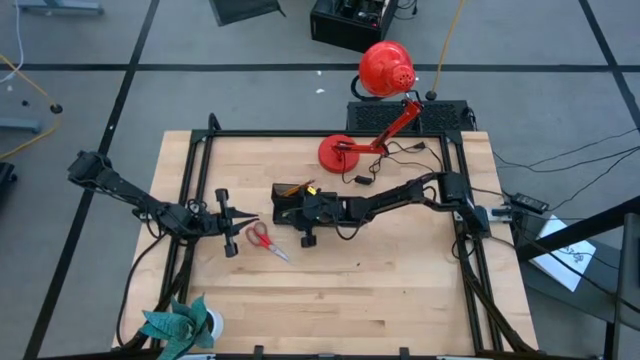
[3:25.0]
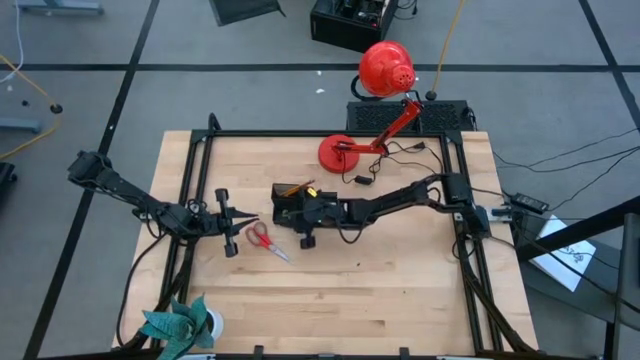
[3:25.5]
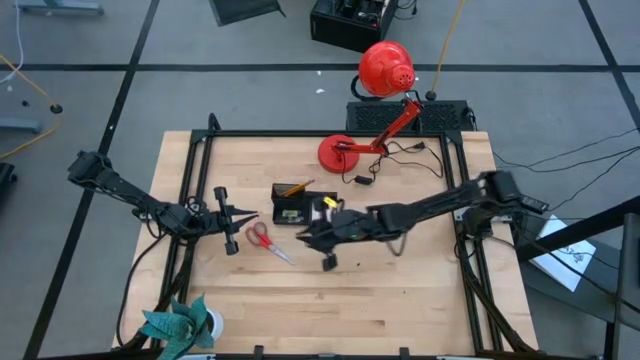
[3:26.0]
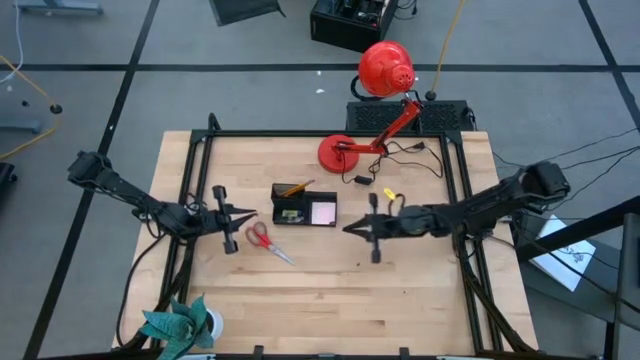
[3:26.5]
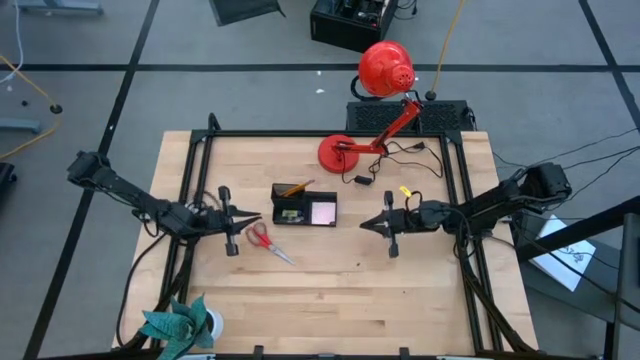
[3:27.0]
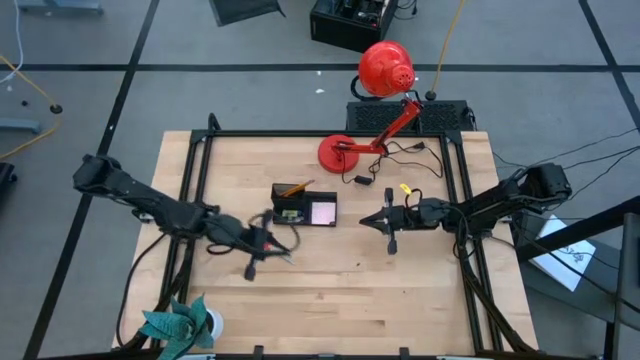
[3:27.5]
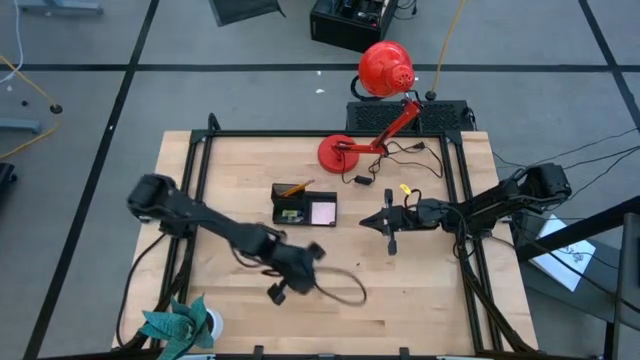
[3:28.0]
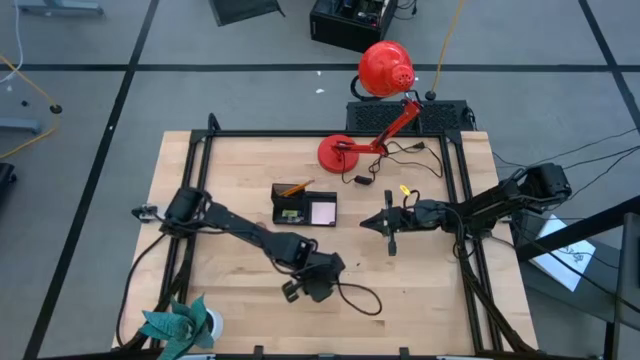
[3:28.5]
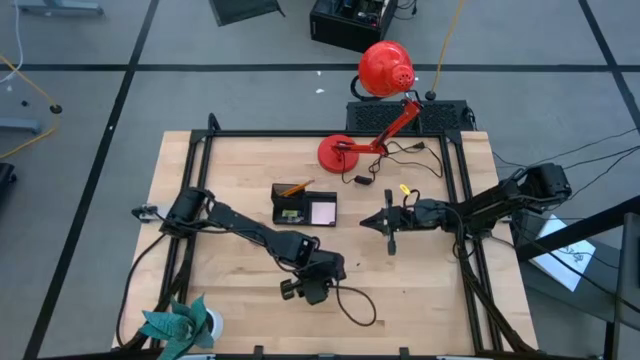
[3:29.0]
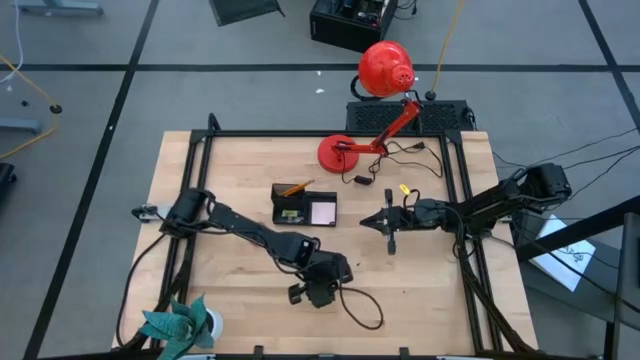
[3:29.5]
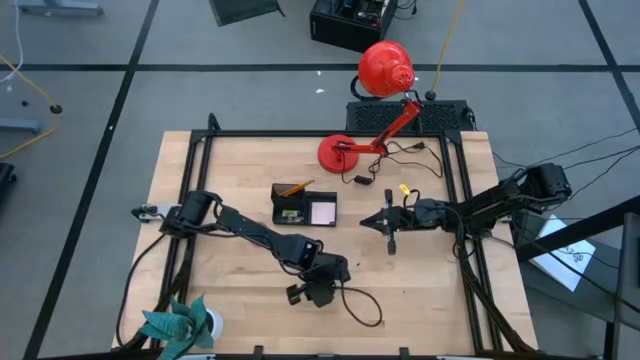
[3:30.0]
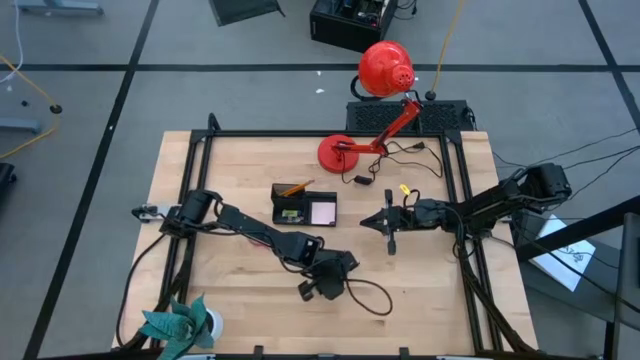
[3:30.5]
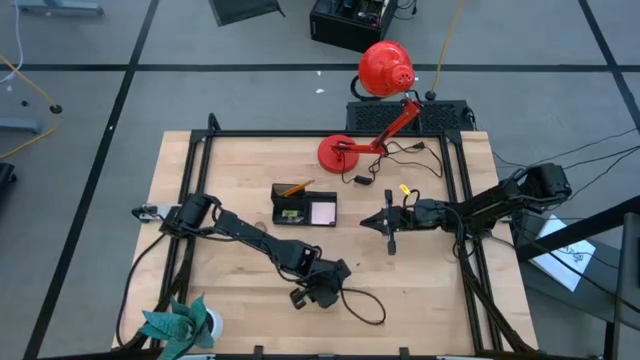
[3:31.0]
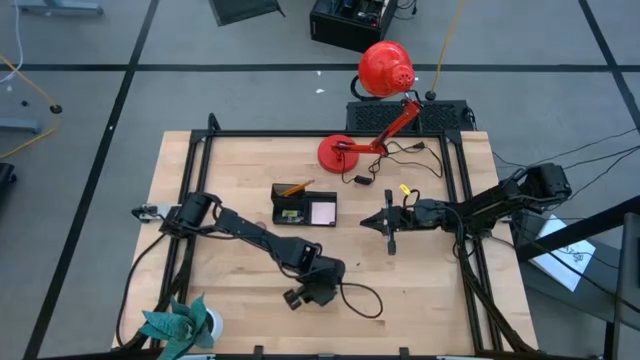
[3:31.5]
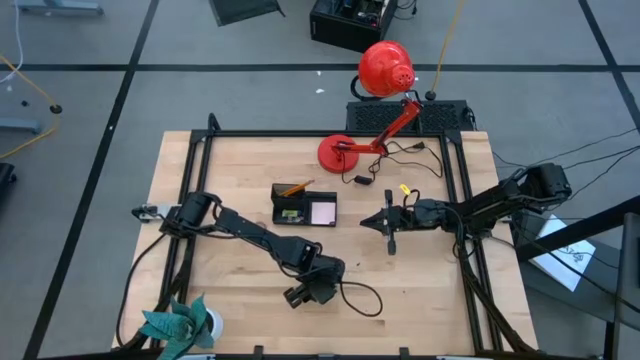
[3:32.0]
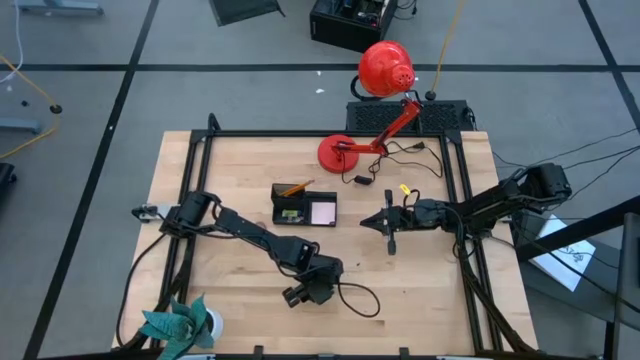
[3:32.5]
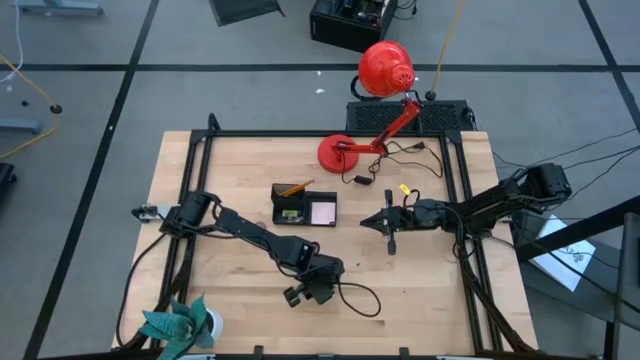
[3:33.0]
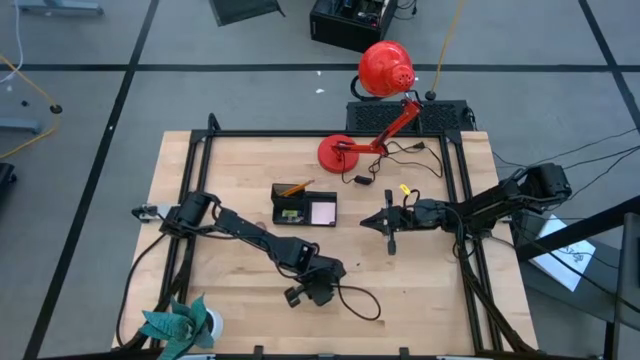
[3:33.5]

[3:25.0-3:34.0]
Task: Pick and place office supplies into organizer
Put the pink binder clip into the mesh desk organizer

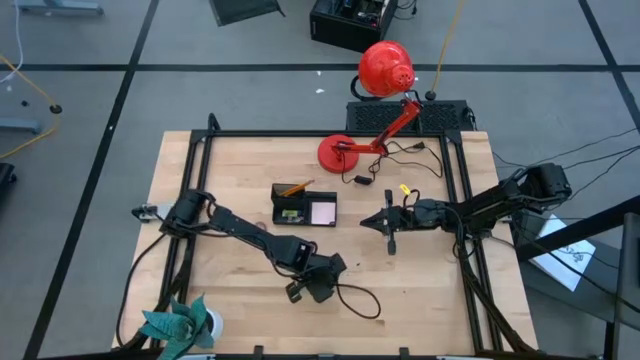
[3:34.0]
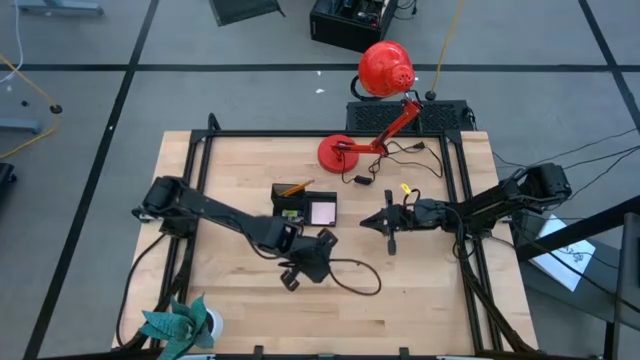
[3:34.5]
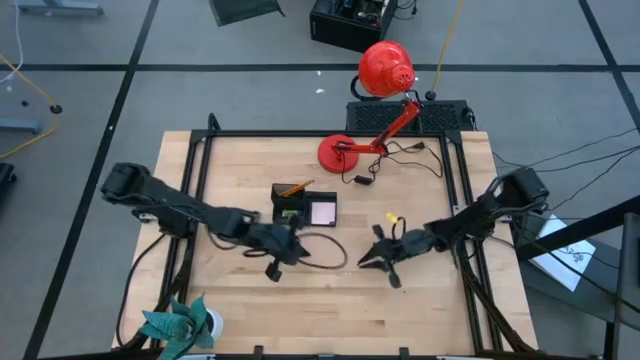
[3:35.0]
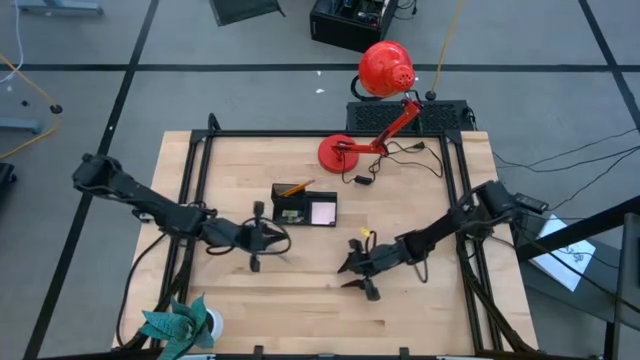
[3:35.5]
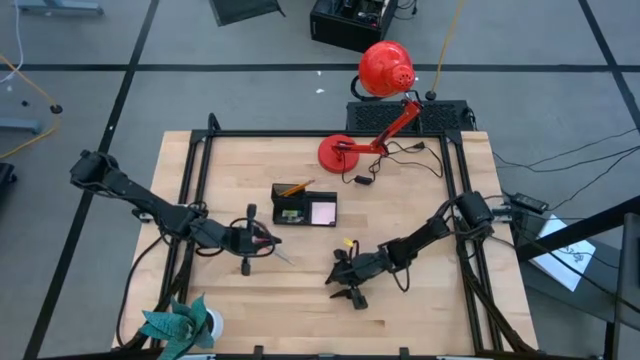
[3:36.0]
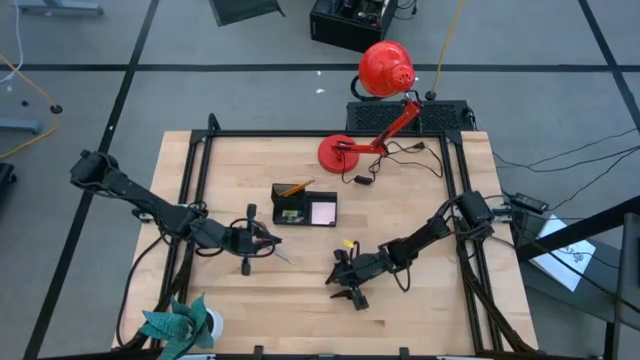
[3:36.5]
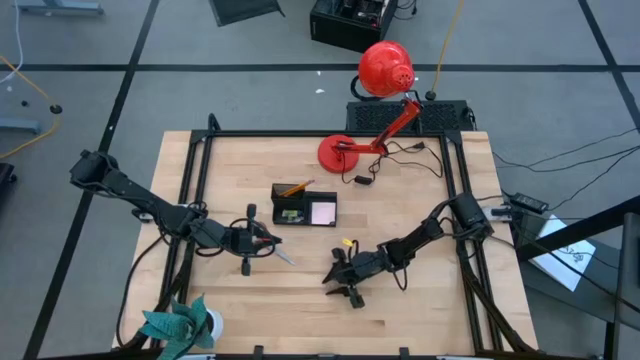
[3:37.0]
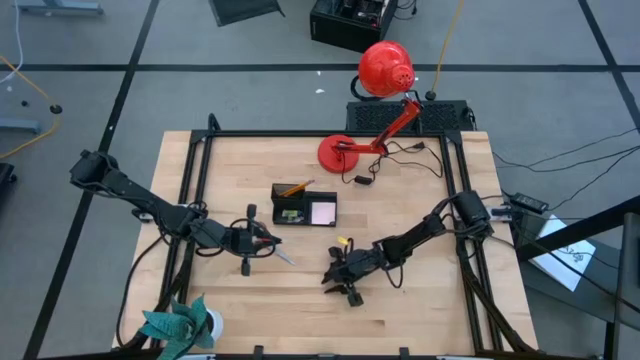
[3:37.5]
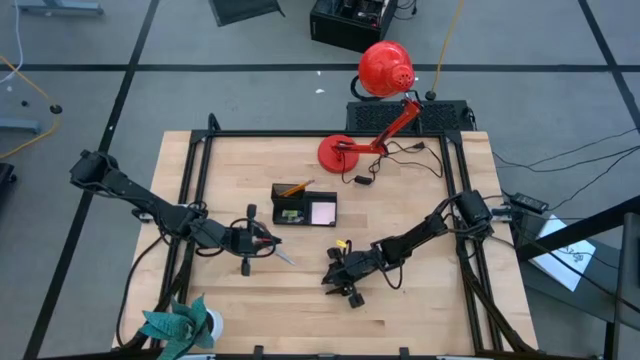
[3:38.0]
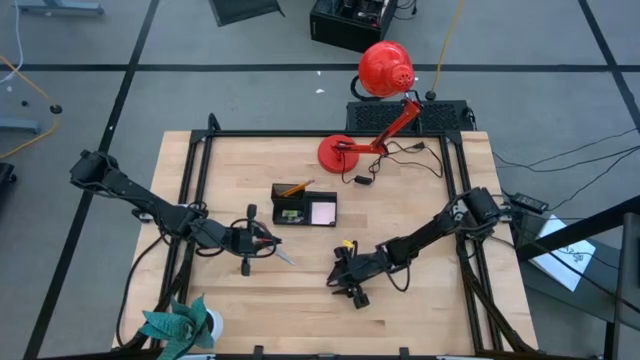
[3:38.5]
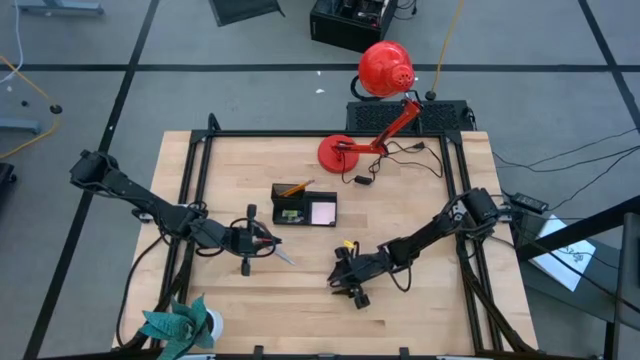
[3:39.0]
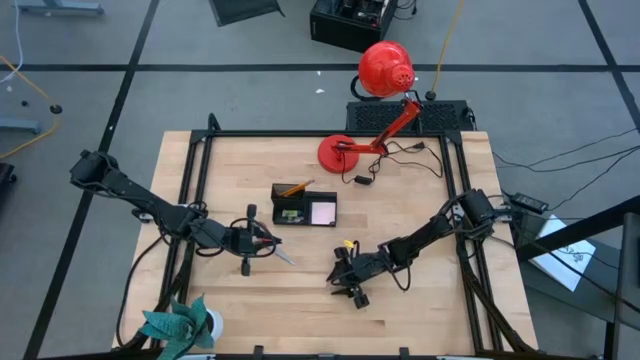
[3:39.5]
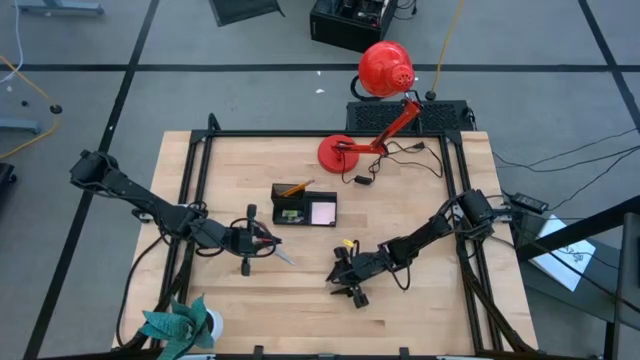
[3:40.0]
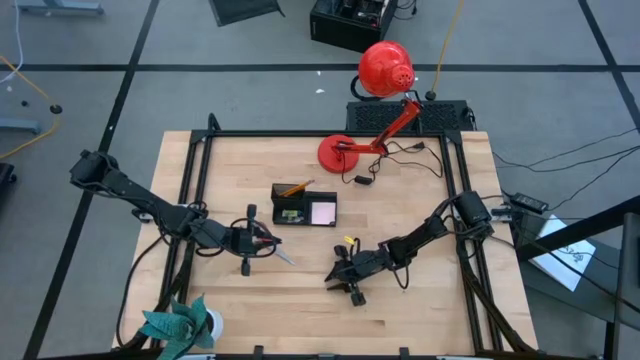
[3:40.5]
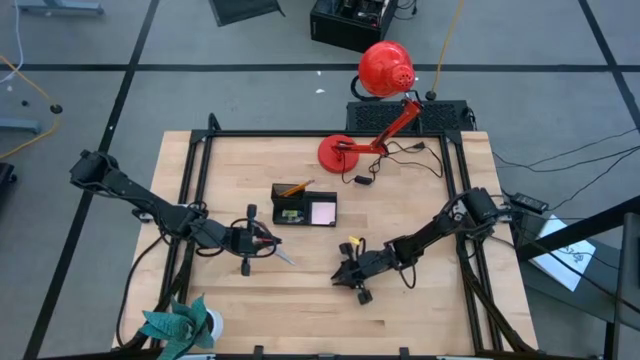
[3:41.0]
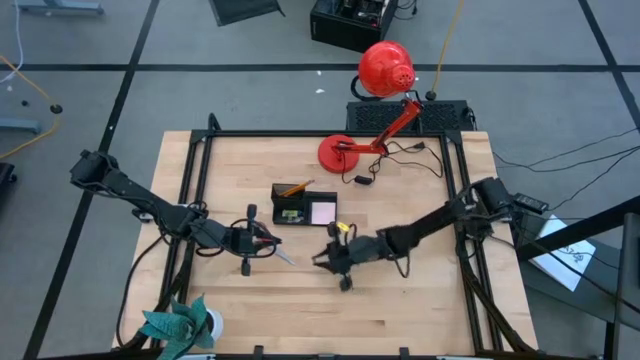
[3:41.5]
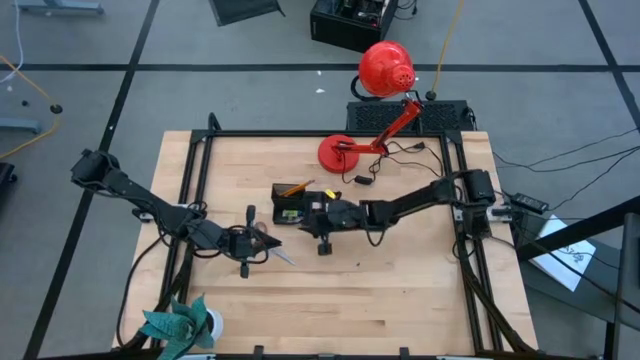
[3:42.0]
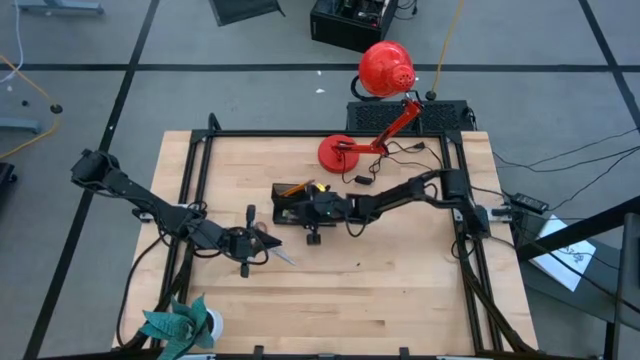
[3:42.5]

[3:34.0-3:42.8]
Put the pink binder clip into the mesh desk organizer

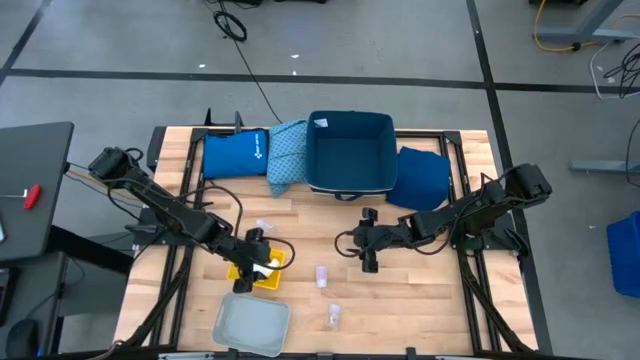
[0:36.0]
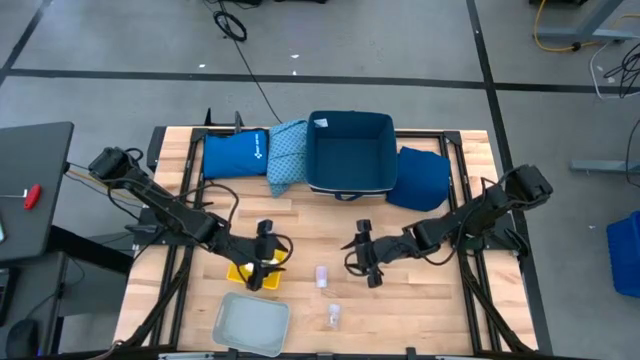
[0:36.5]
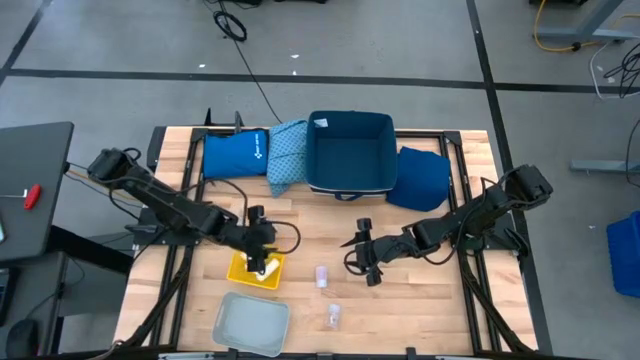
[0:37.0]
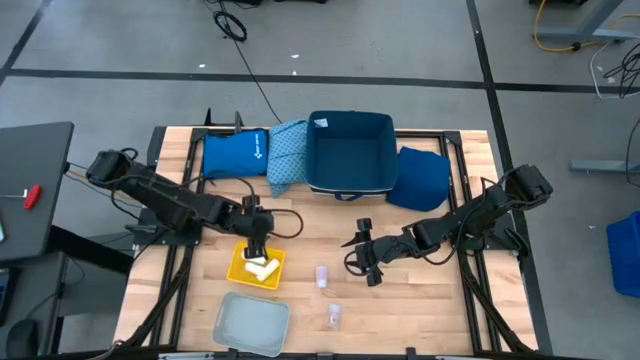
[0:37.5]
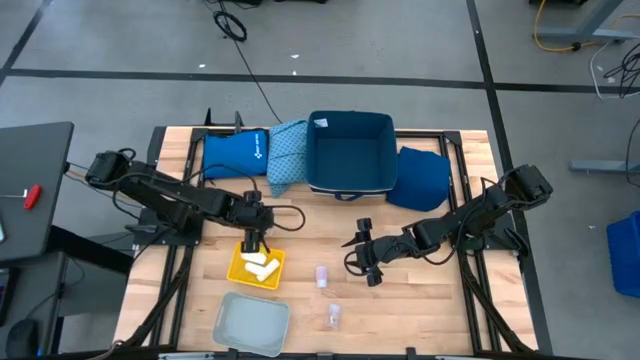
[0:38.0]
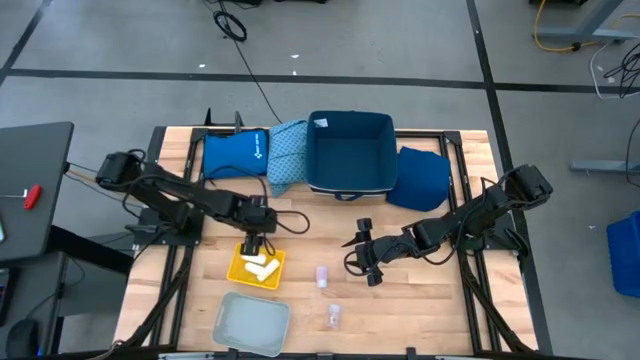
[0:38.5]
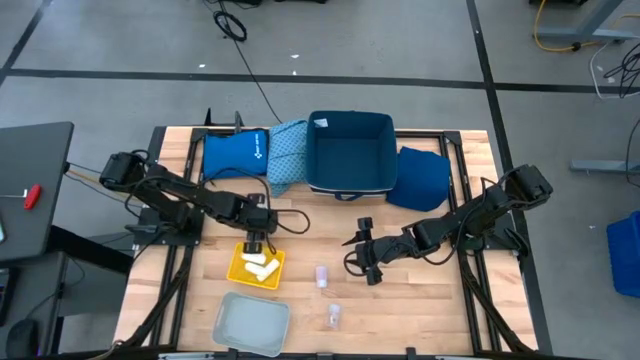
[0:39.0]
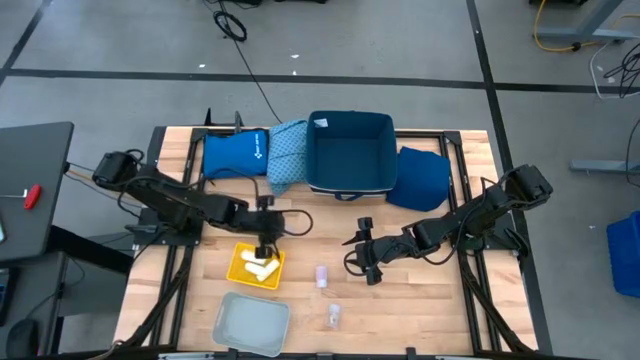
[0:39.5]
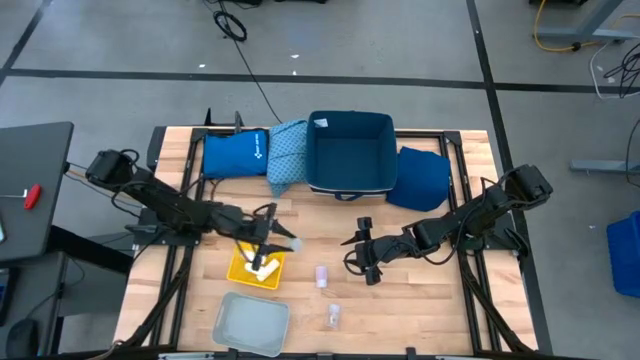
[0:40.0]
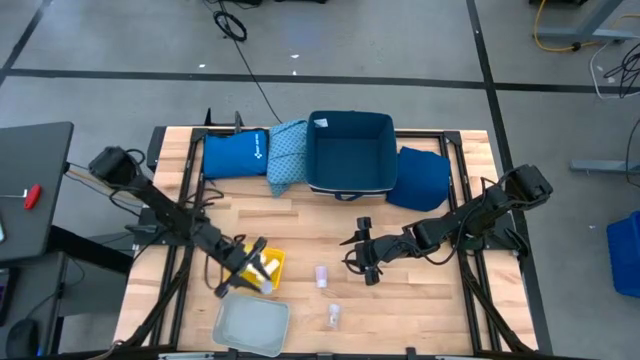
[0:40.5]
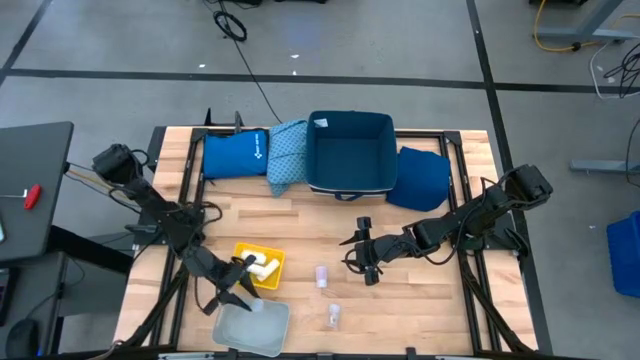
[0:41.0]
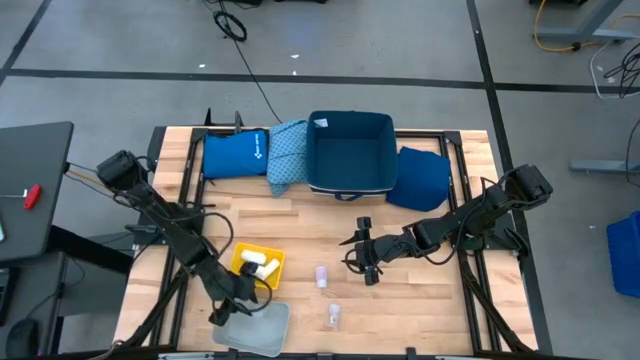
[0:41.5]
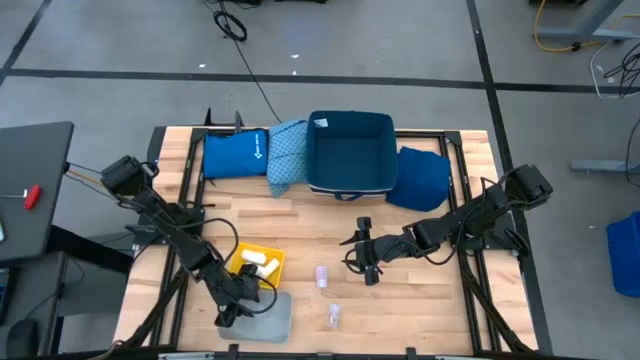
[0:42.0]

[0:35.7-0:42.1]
Task: Pick & place medical supplies in basket/bin
Put the top white pill bottle into the gray bin
